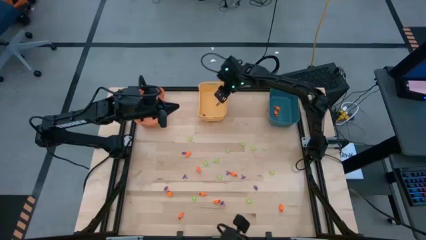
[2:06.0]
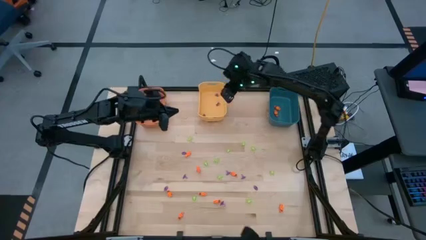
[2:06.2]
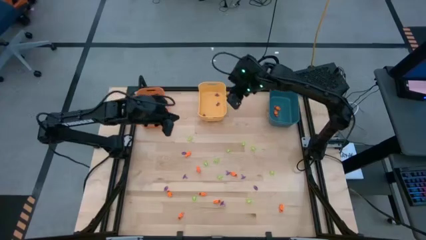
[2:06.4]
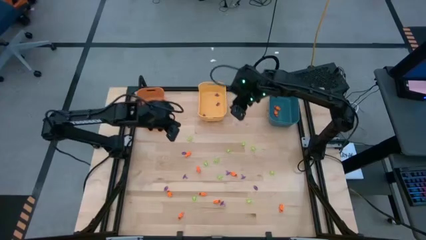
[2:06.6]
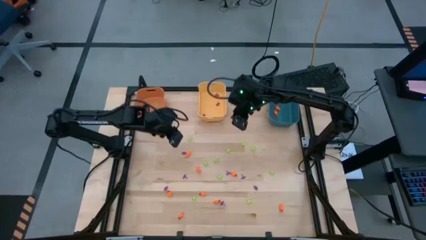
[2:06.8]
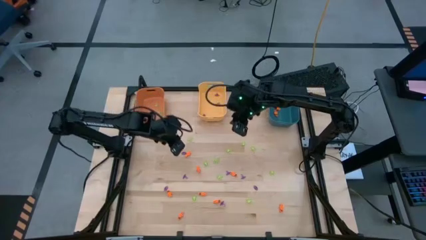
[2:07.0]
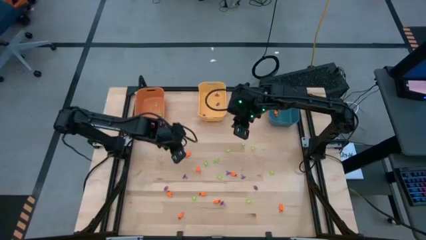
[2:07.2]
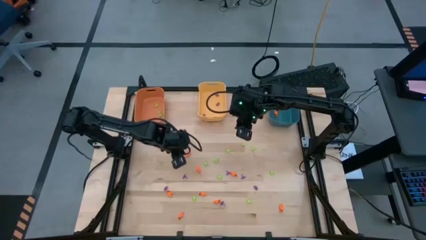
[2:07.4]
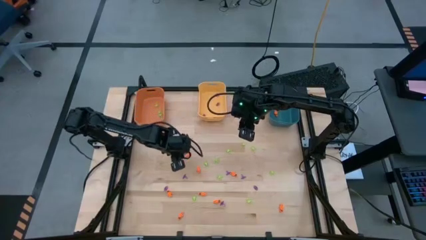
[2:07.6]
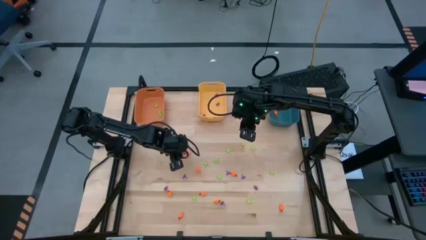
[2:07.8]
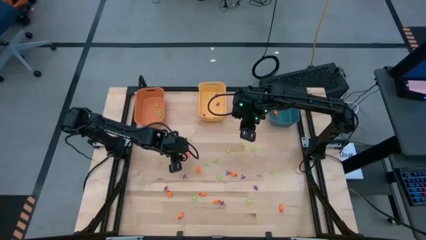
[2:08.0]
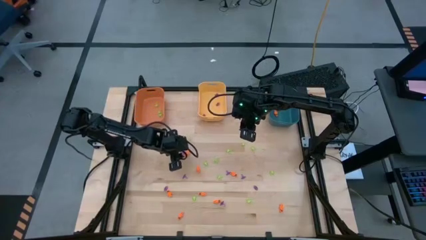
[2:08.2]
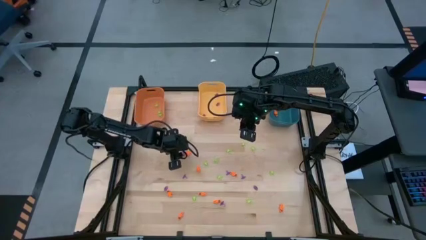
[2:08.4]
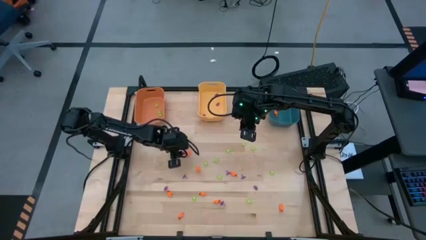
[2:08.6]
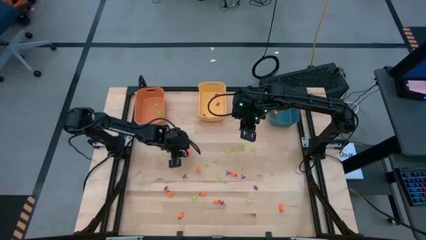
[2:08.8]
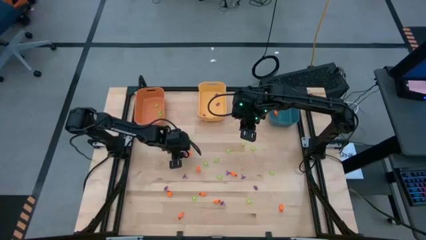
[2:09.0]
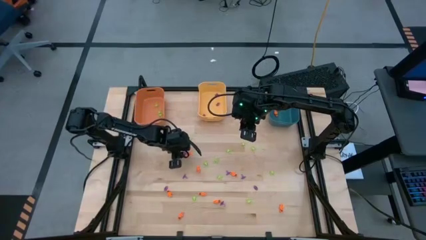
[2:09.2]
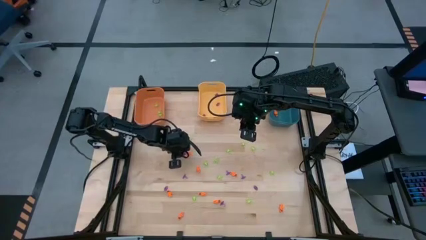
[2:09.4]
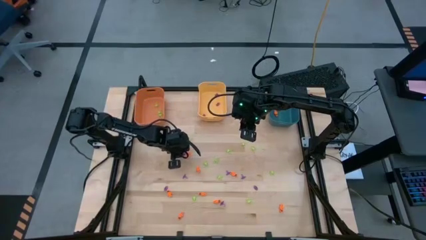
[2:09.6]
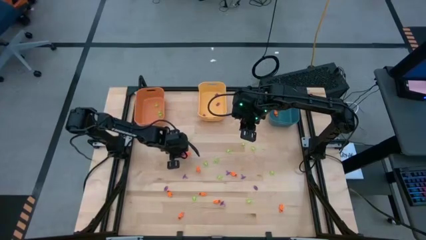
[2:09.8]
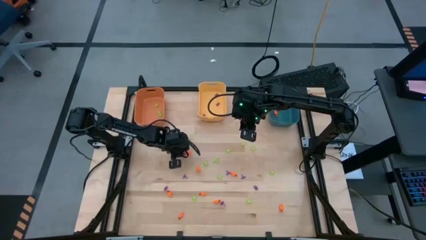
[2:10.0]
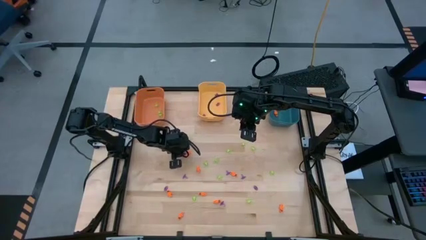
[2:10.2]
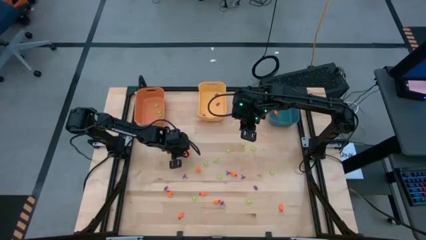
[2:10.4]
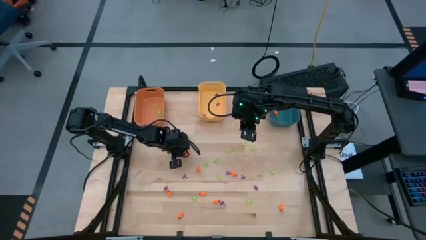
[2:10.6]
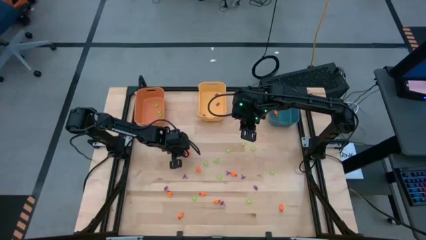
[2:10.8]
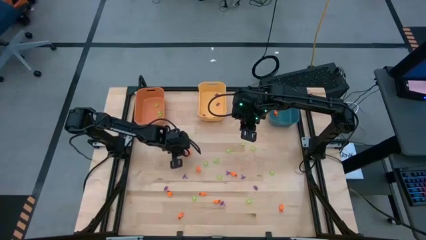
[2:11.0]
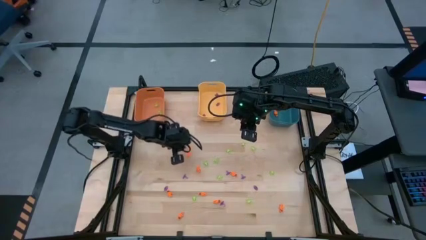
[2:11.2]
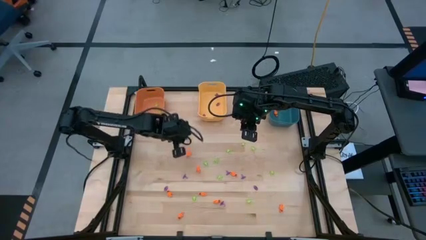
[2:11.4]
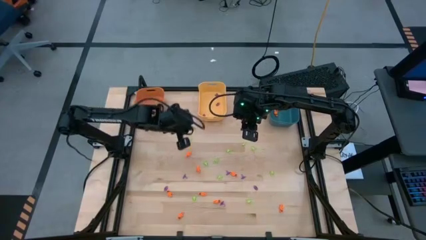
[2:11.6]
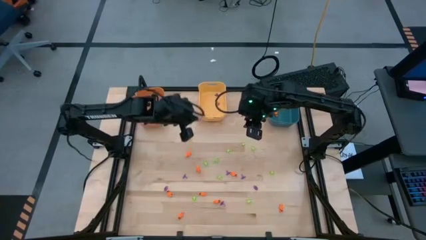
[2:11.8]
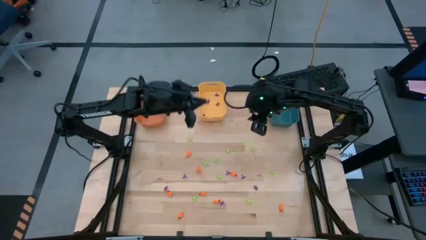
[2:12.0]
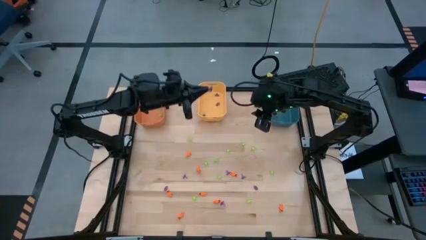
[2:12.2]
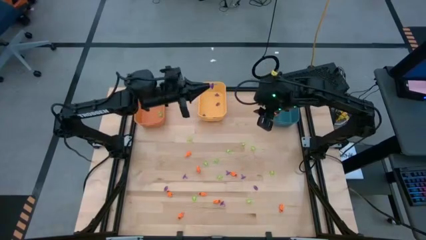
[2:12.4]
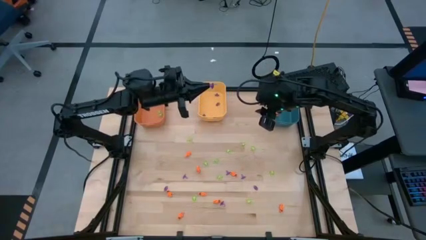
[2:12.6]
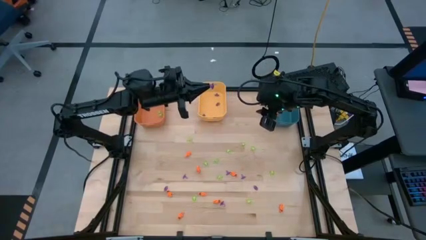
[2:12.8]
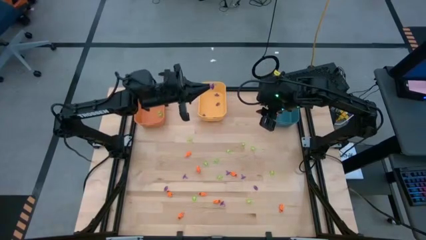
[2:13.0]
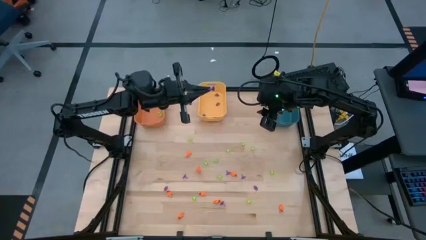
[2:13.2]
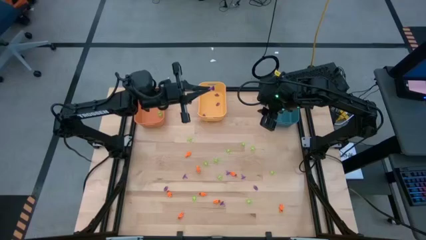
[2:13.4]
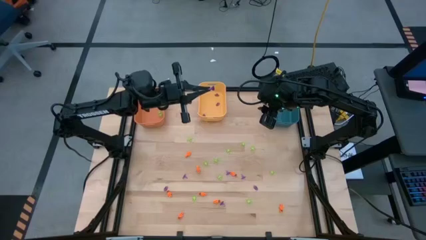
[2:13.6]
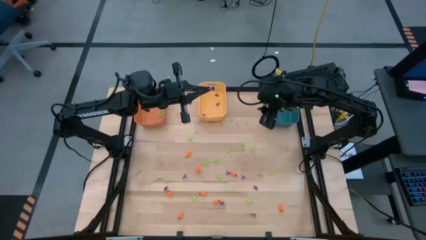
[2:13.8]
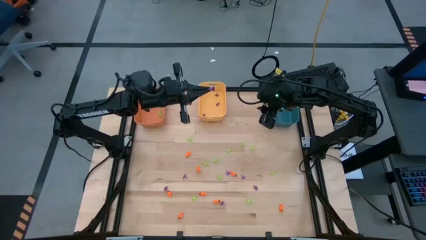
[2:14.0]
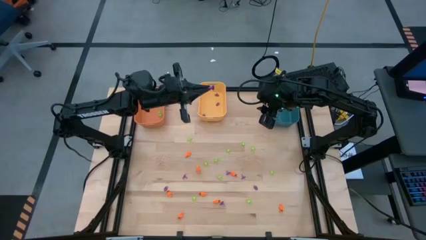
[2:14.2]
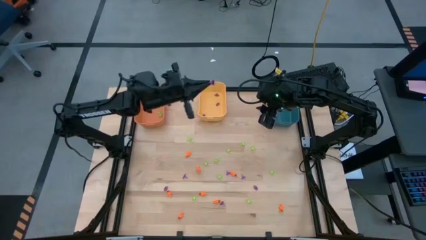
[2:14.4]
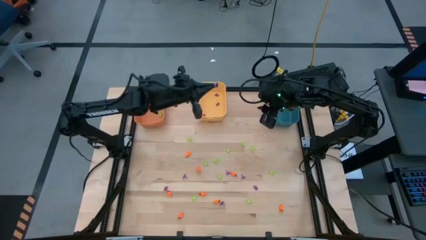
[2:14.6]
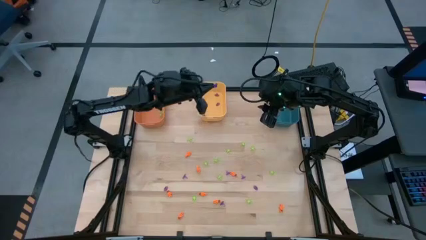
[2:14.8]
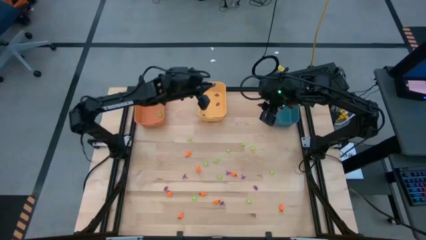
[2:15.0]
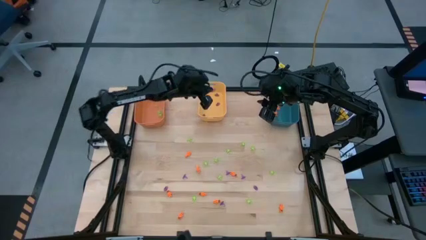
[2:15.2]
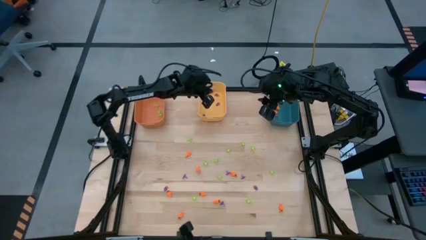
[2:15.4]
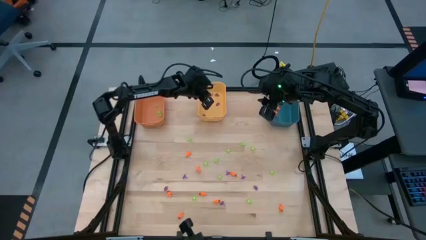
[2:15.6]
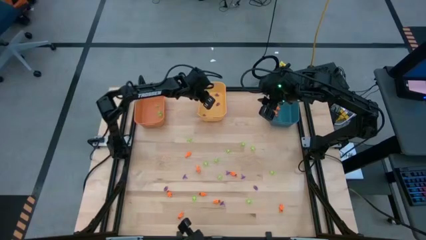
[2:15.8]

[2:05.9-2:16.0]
Task: Sort Halloween decoration
Put the purple witch hat toy into the yellow bin

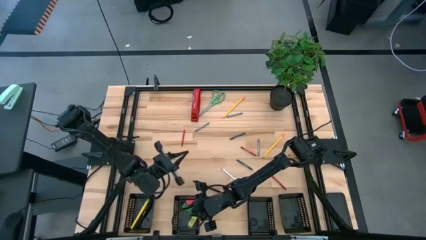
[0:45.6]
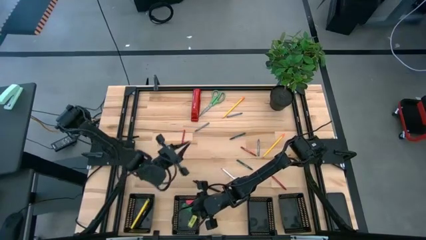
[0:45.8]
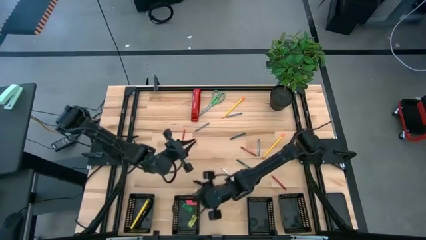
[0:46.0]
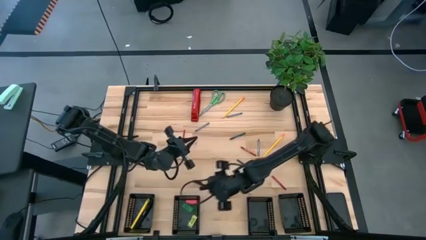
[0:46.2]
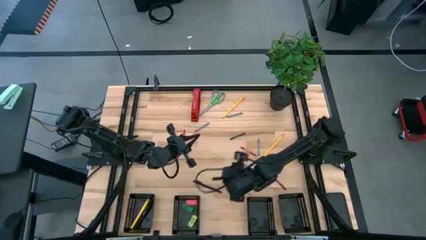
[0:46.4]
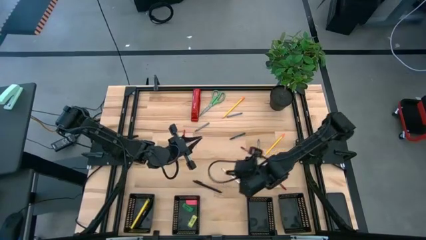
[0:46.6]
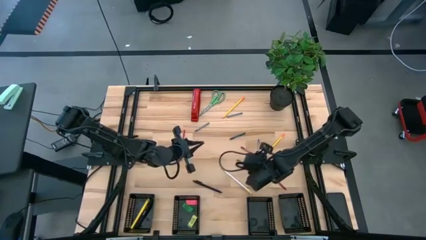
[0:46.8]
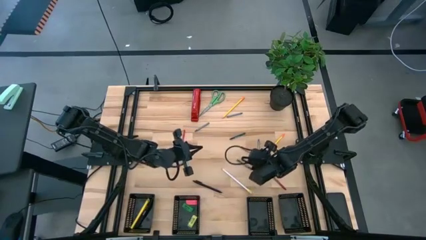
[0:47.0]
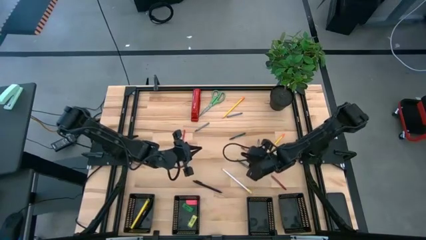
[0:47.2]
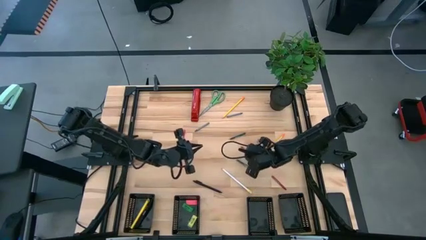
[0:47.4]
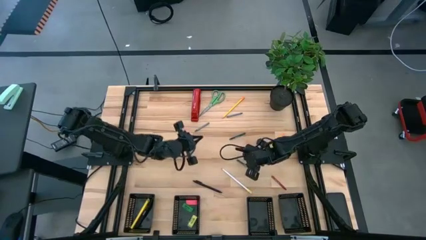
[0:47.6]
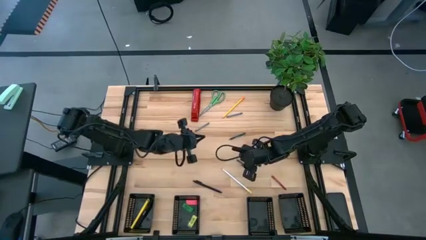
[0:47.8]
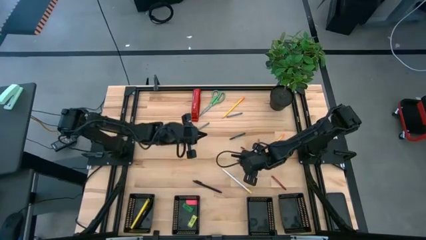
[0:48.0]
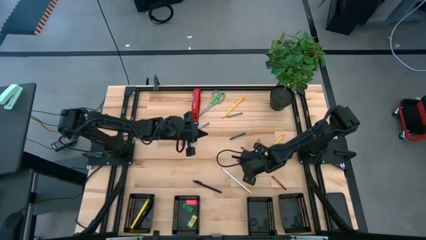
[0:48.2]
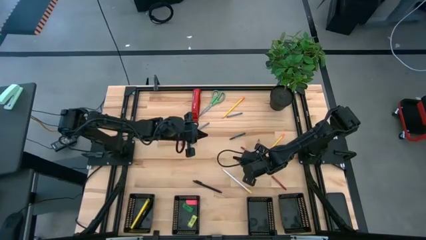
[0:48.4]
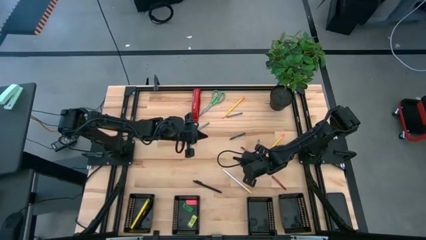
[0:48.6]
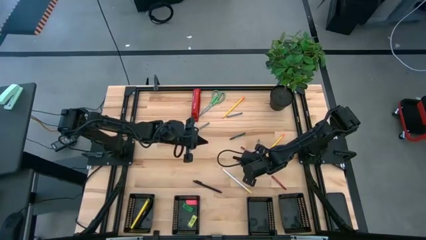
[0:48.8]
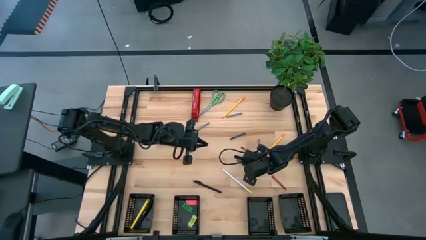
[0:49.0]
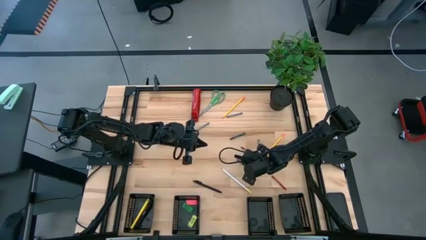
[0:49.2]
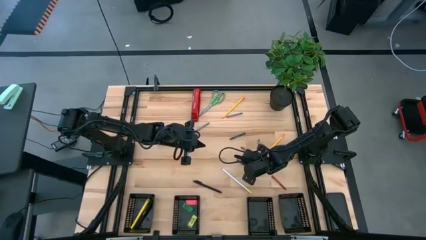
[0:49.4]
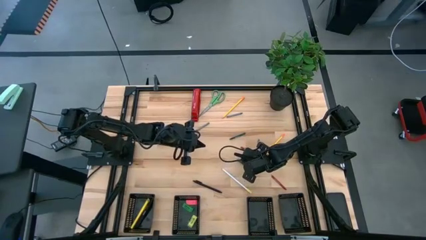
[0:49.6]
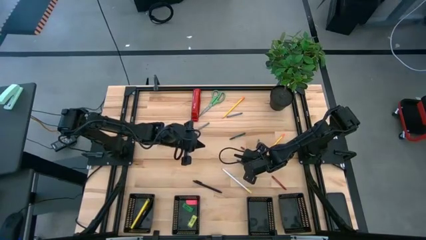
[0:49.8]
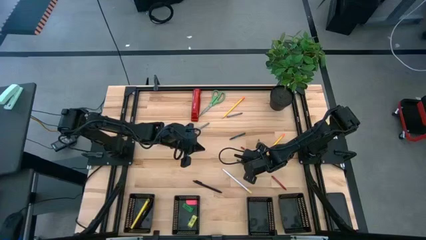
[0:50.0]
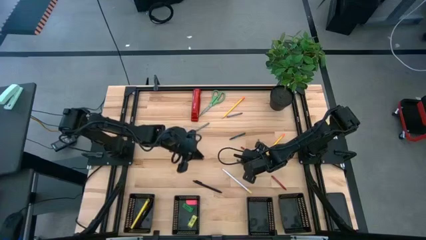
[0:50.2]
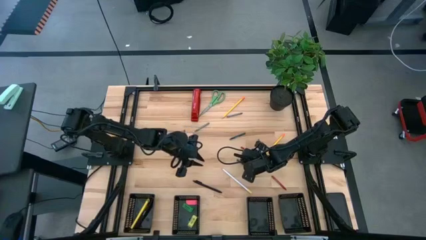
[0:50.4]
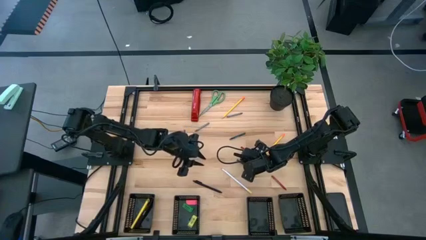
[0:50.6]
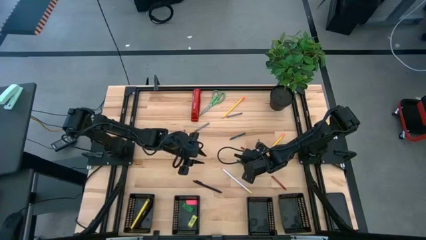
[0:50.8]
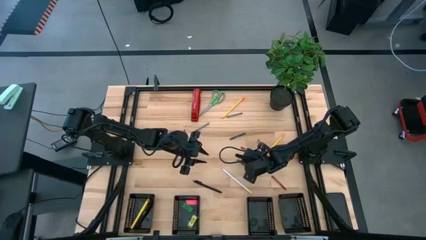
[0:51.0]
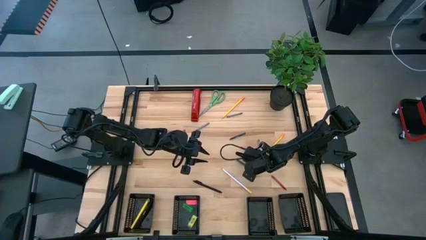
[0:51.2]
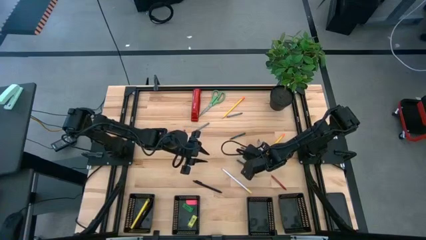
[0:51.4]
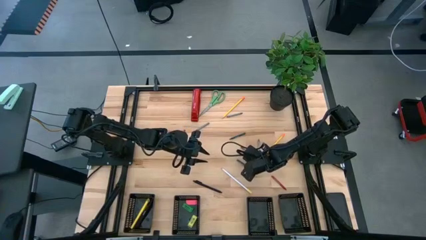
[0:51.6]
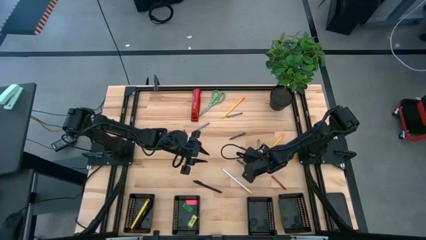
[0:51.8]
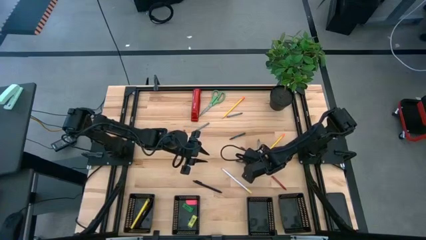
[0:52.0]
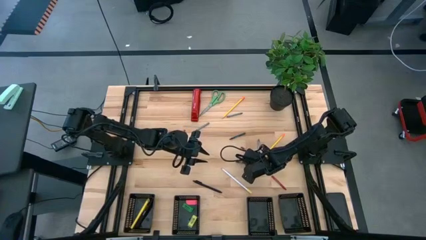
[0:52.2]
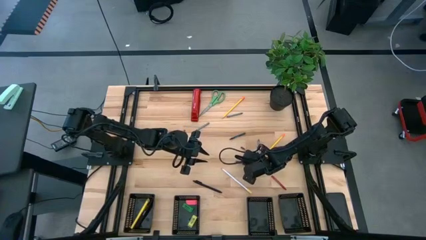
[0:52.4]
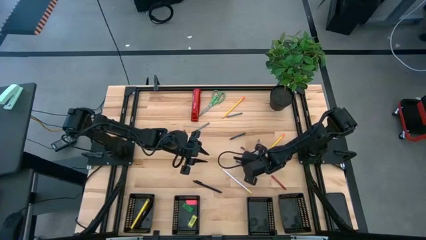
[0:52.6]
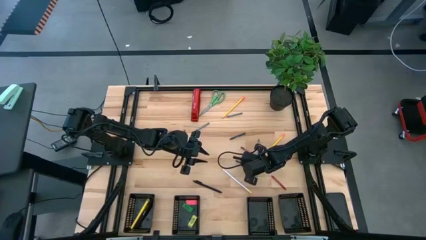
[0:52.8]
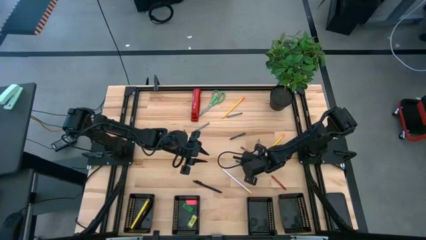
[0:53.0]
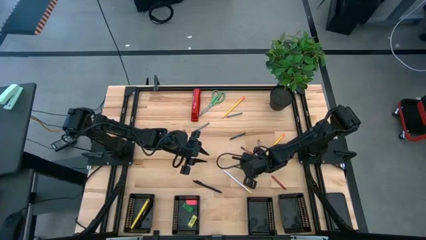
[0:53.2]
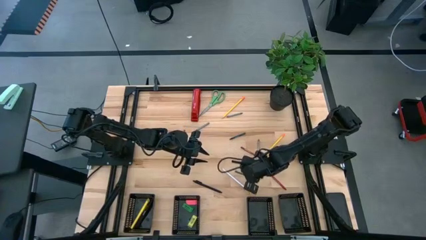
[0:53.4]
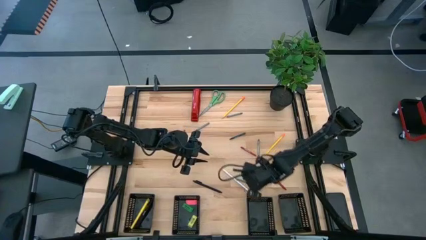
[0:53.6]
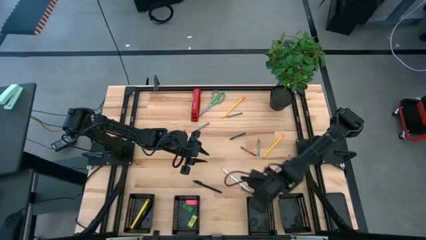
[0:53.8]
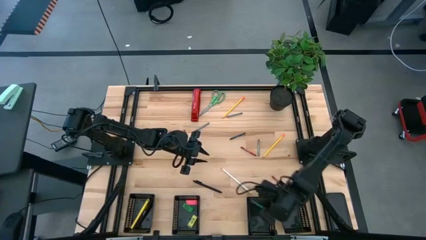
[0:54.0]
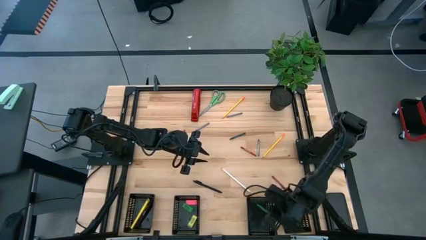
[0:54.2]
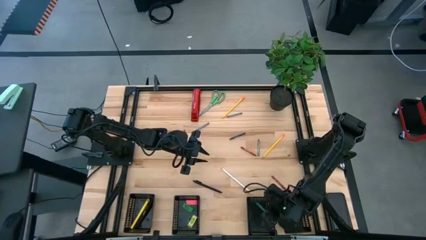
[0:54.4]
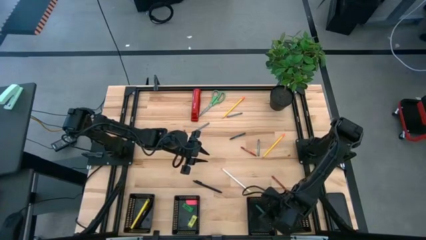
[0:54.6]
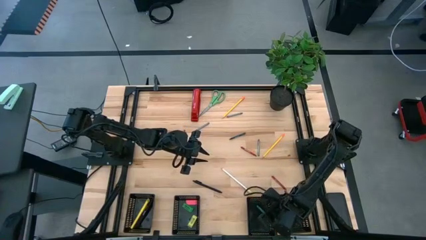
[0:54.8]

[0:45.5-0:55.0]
Task: Sort crayons/erasers/pens/pencils in bins
Put the bottom green crayon into the middle right black bin
